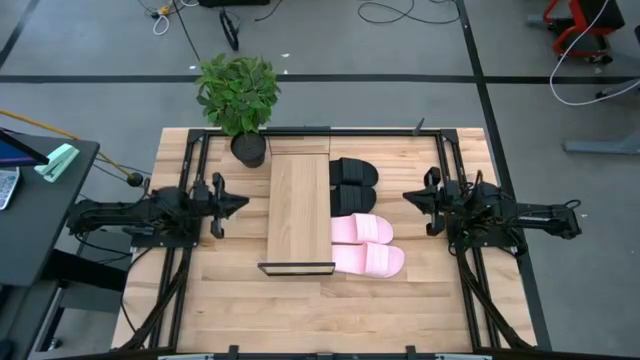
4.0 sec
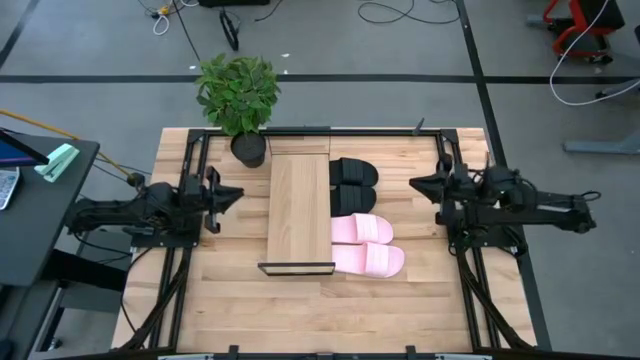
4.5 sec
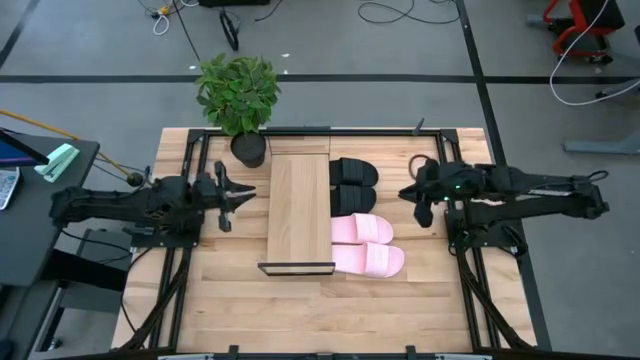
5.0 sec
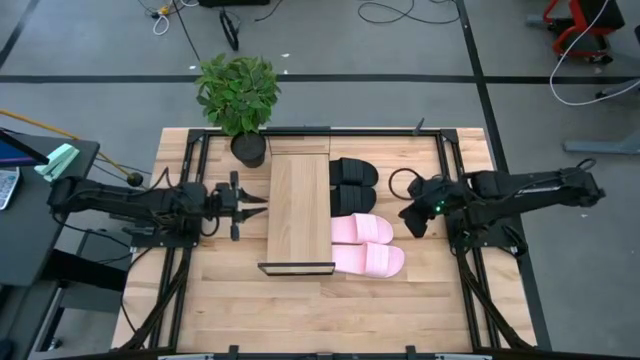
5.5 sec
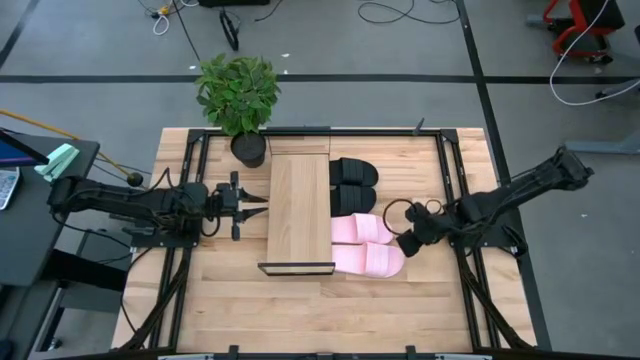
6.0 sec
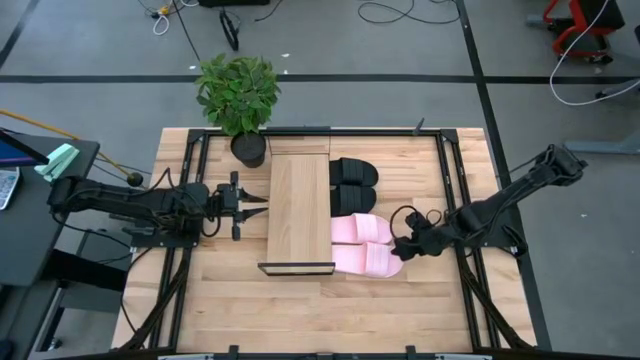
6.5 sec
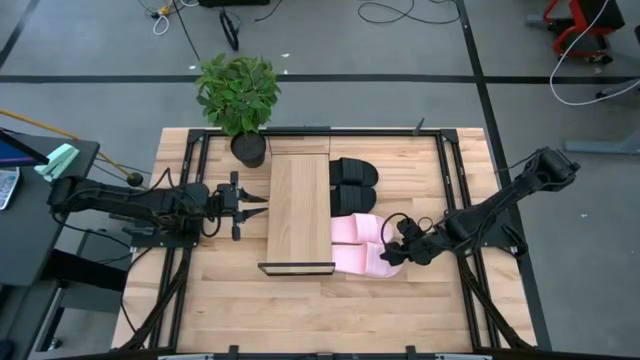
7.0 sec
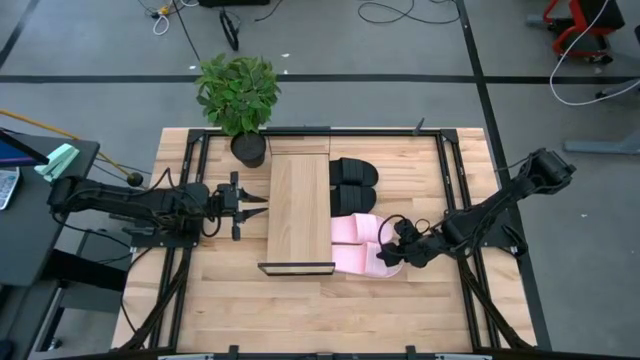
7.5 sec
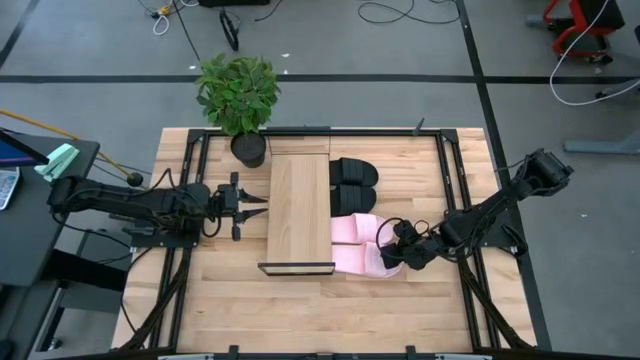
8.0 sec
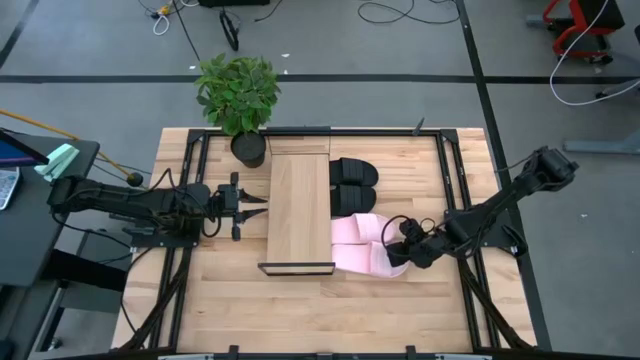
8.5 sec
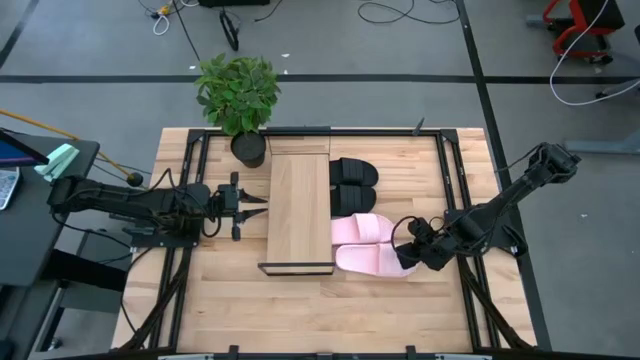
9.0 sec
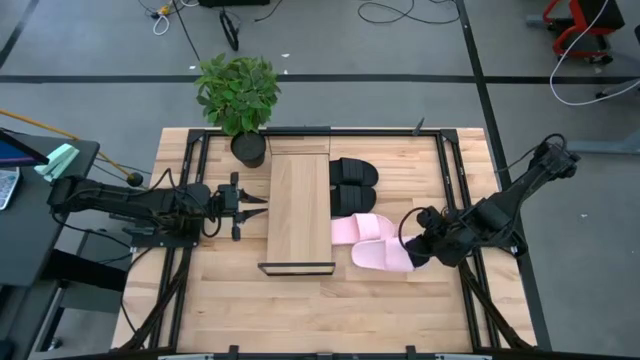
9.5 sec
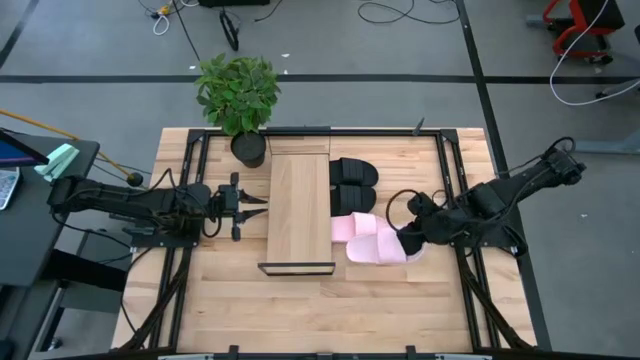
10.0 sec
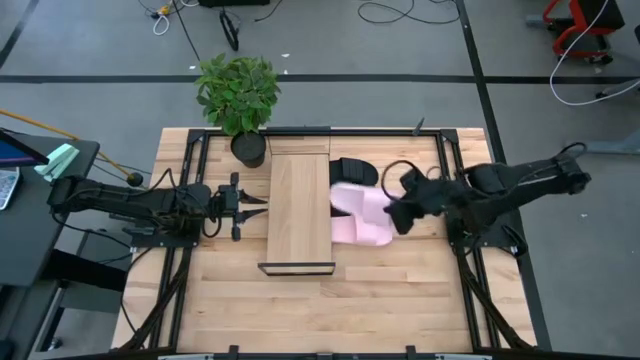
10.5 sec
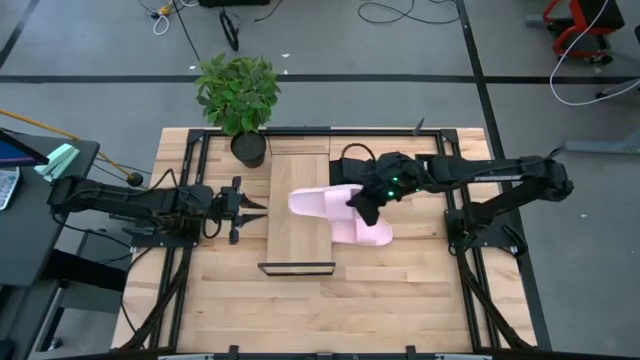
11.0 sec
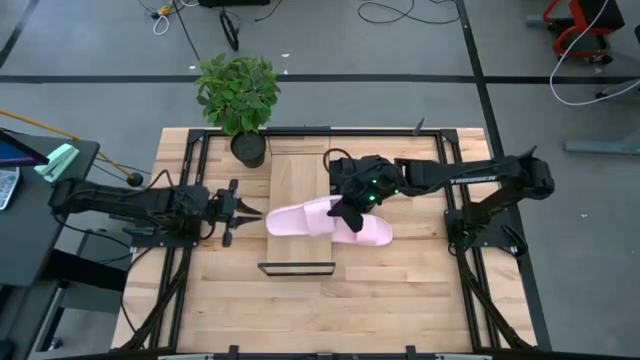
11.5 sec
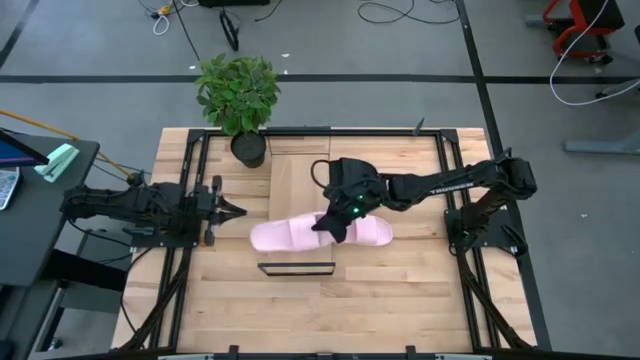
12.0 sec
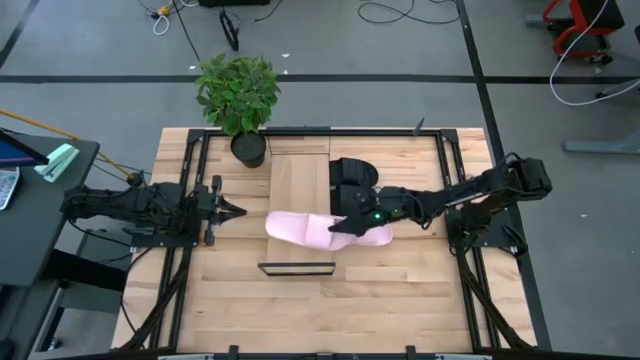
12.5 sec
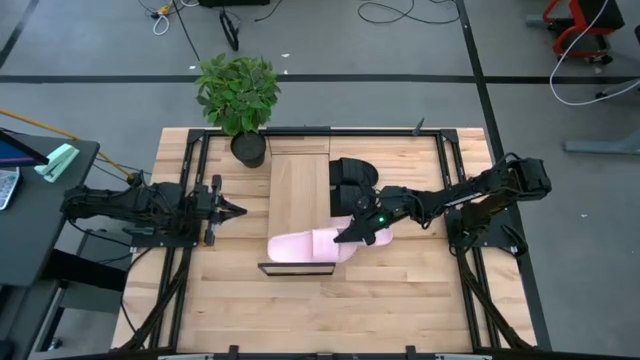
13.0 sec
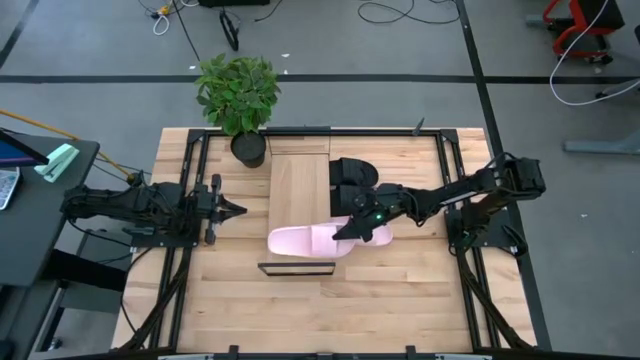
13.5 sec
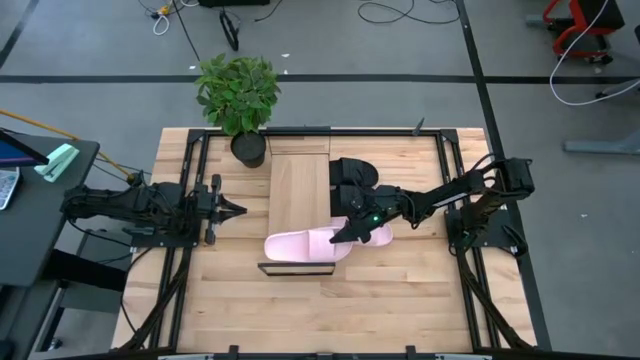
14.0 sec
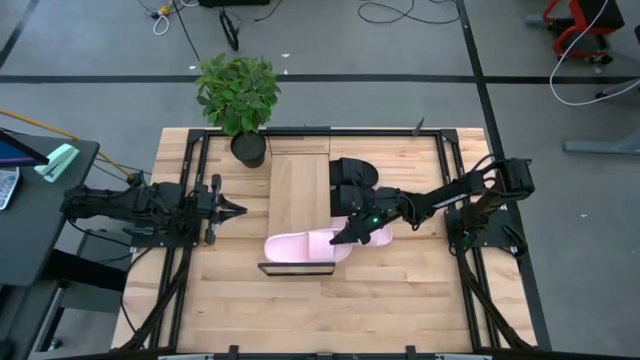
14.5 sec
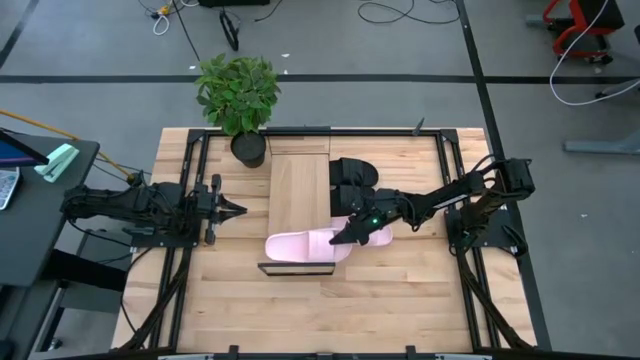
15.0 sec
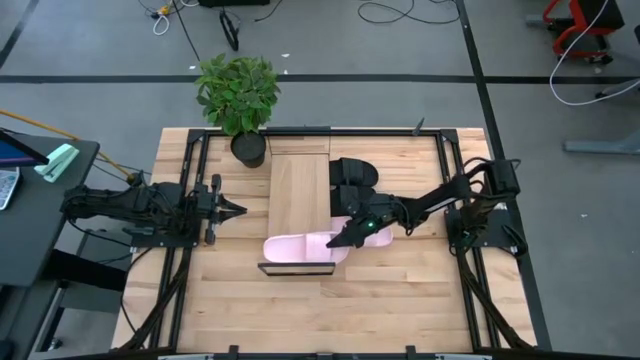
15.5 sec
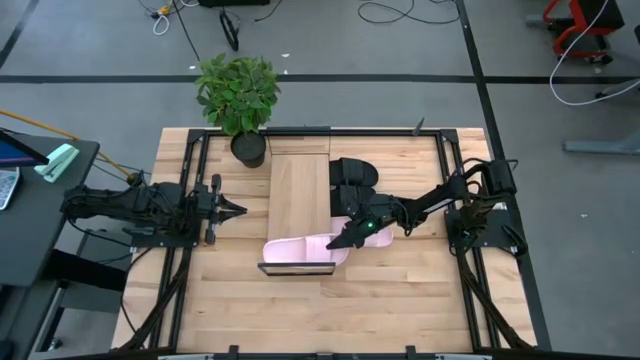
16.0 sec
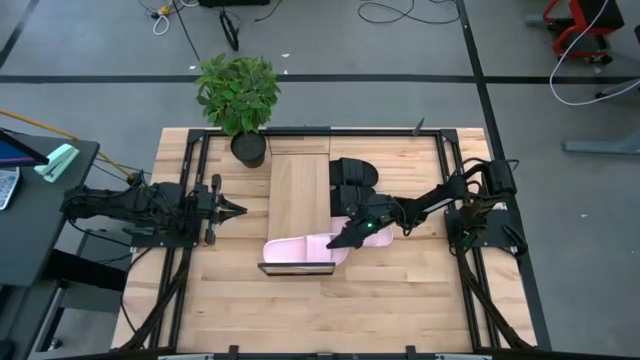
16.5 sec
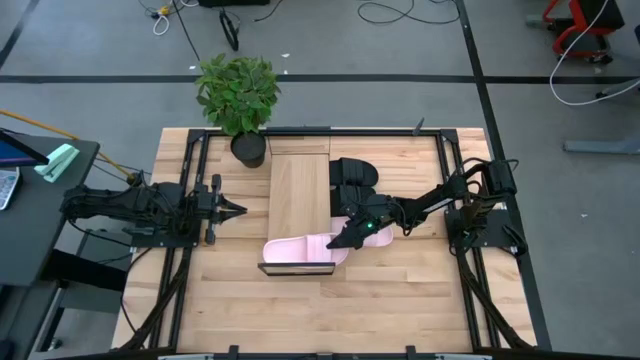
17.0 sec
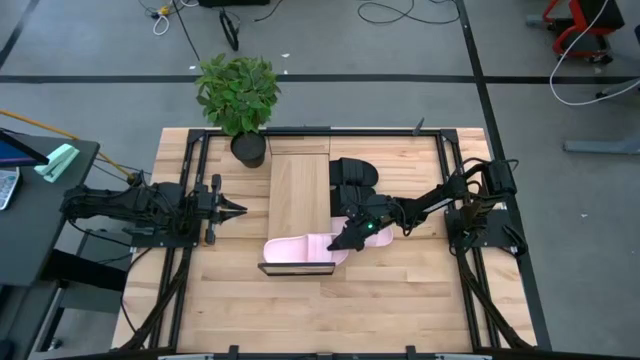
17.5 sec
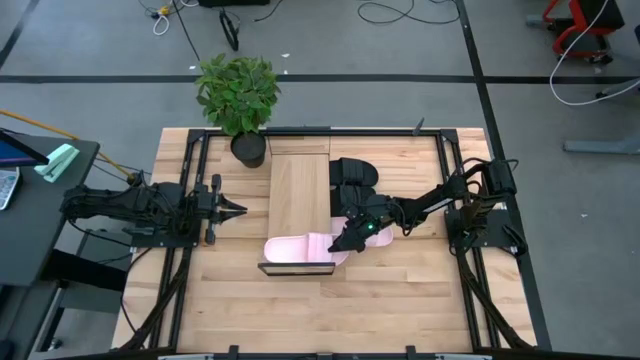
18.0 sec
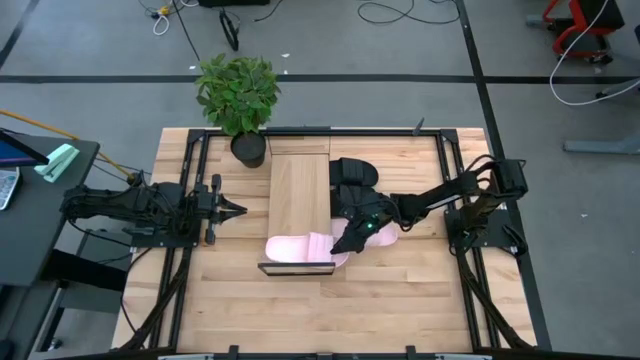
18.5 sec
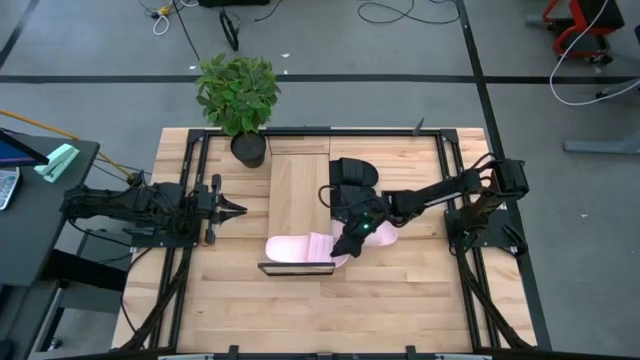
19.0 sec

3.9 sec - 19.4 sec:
Task: Pick and place slides into the shelf
Put the bottom pink slipper on the shelf
